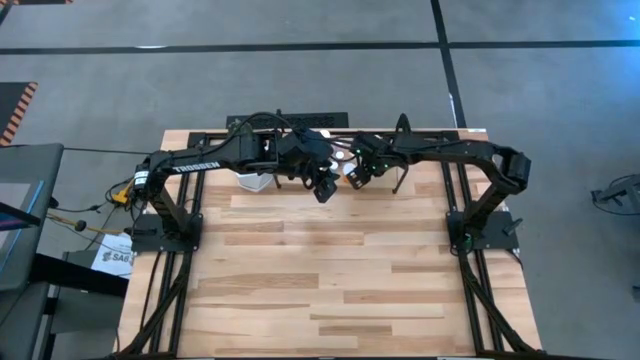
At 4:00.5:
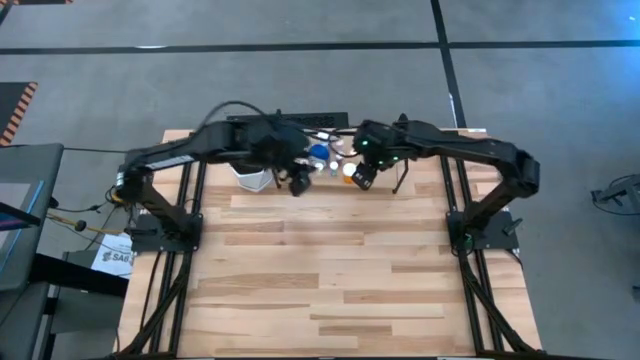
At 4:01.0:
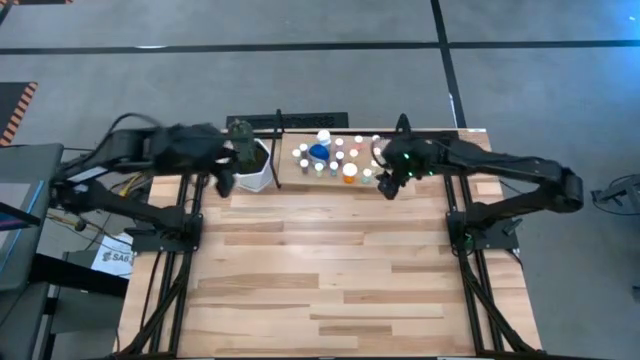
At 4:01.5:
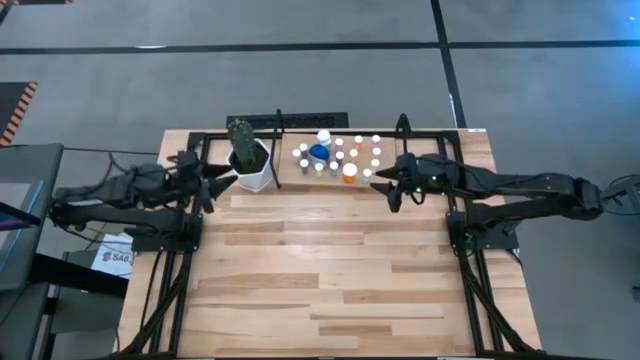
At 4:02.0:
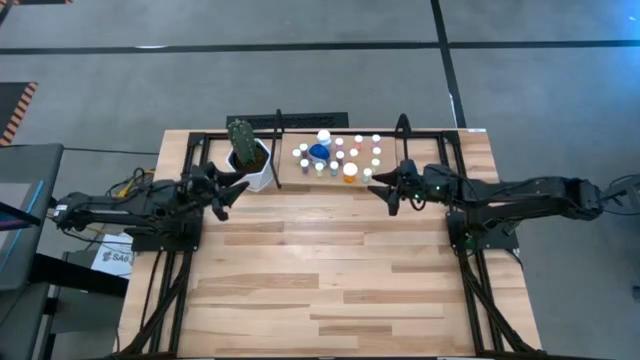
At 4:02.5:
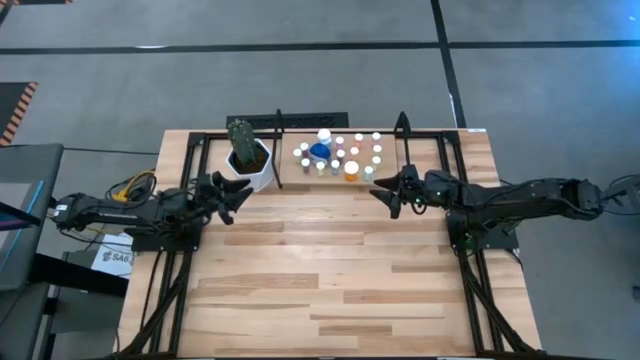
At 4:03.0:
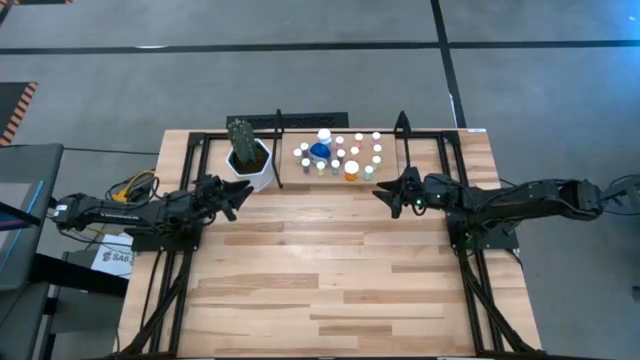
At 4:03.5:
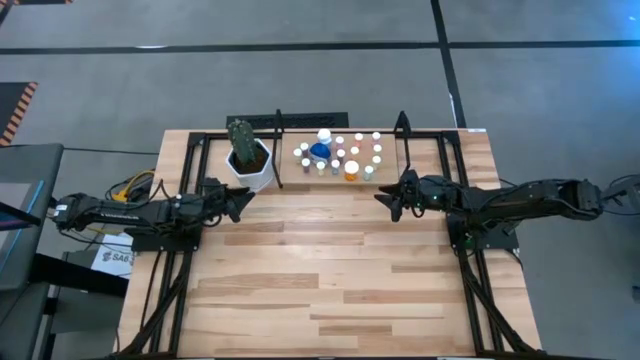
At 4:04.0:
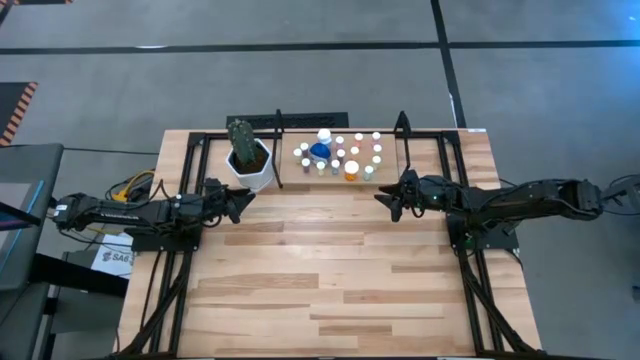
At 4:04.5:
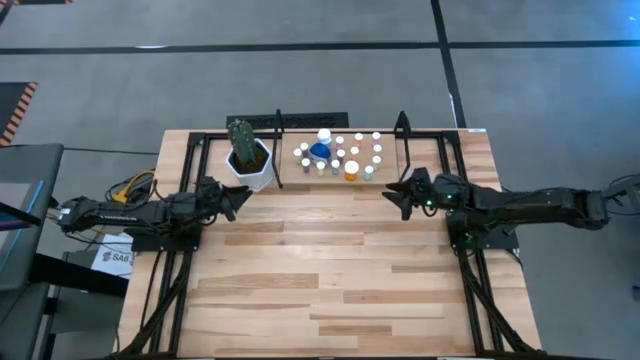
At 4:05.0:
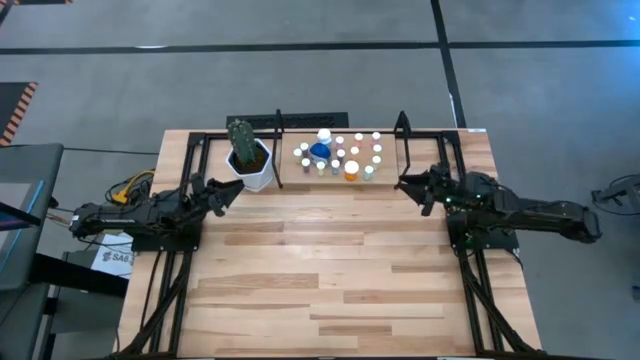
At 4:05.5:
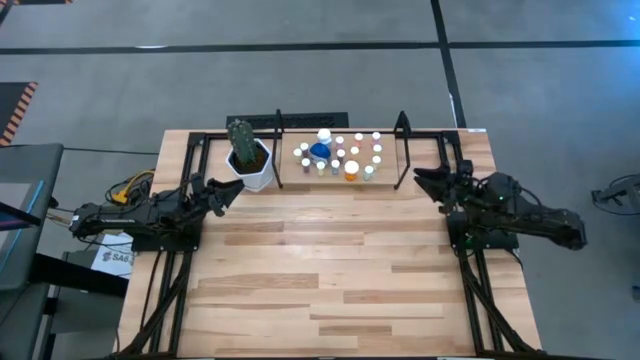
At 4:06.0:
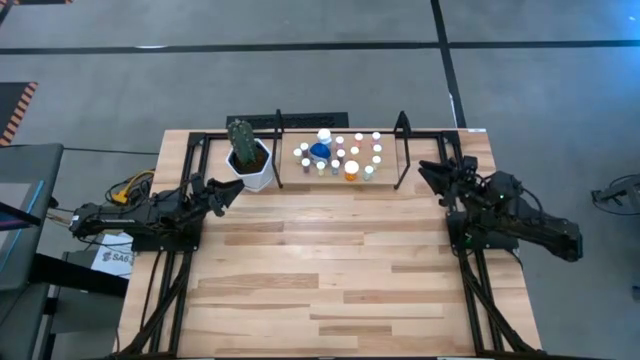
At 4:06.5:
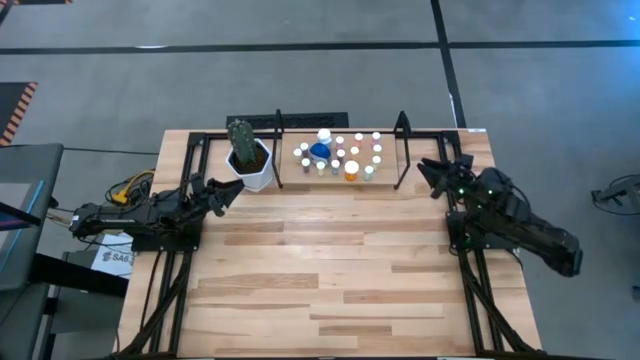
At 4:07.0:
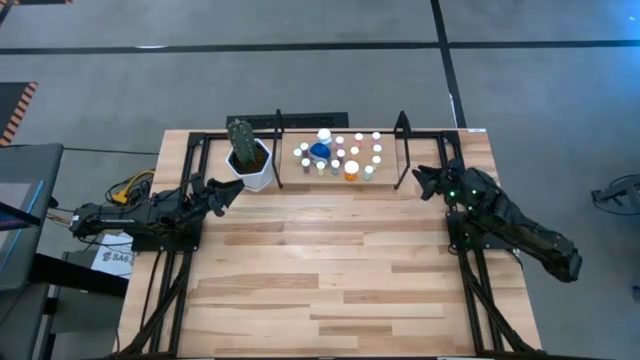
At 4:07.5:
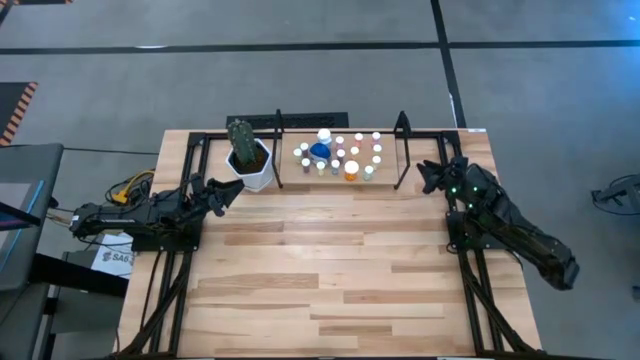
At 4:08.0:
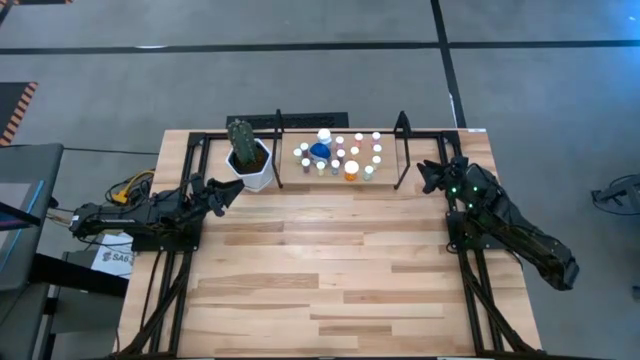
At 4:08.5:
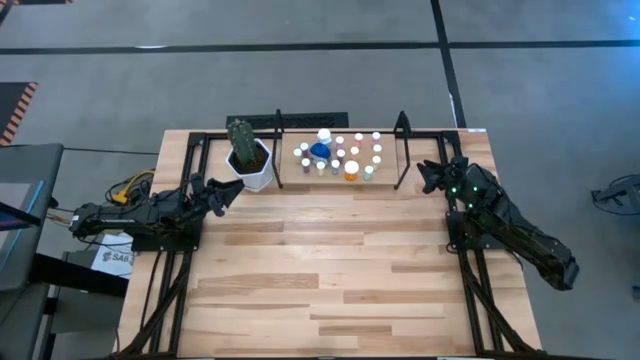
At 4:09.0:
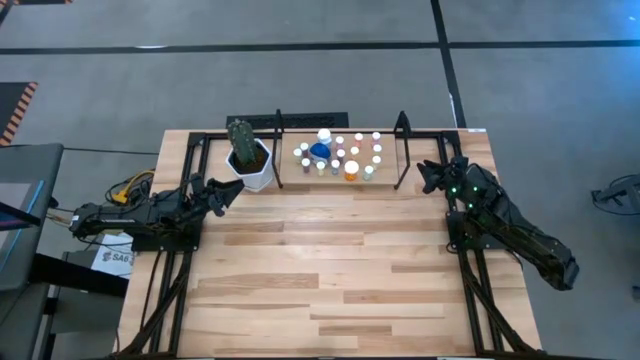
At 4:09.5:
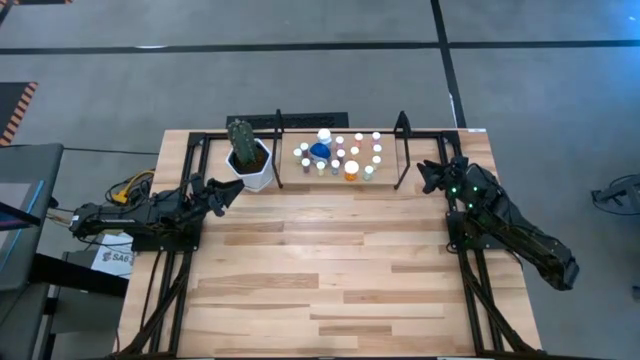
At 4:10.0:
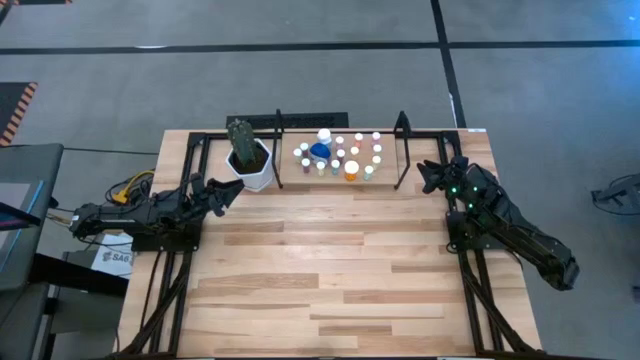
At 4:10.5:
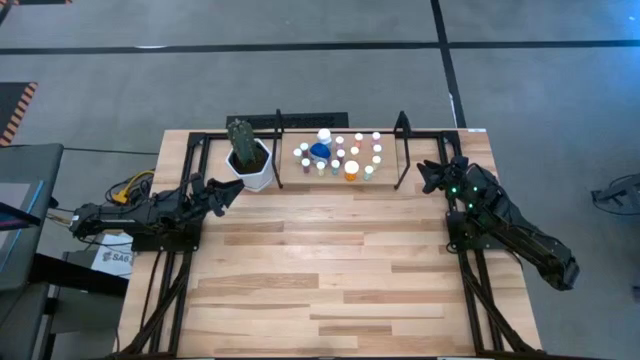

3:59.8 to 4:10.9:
Task: Pick and place medicine bottles onto shelf by color
Return to Home Position

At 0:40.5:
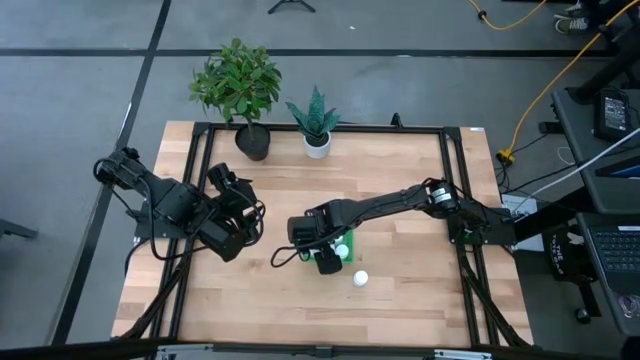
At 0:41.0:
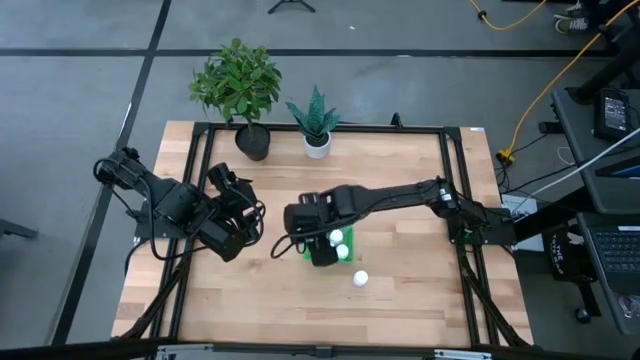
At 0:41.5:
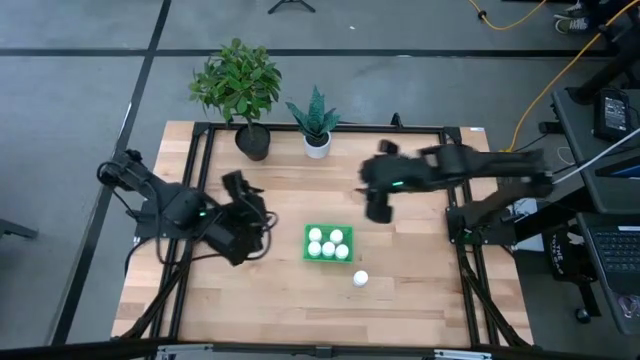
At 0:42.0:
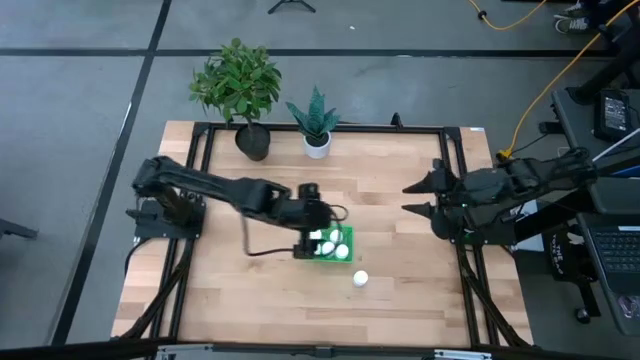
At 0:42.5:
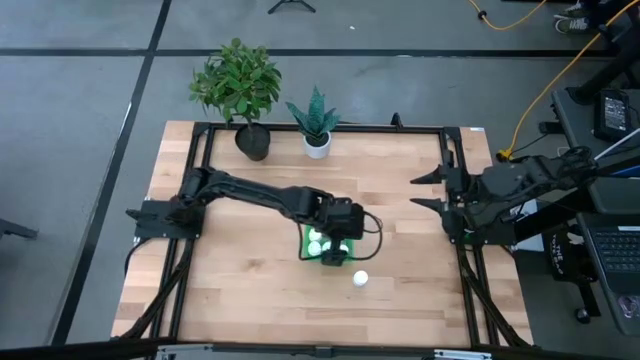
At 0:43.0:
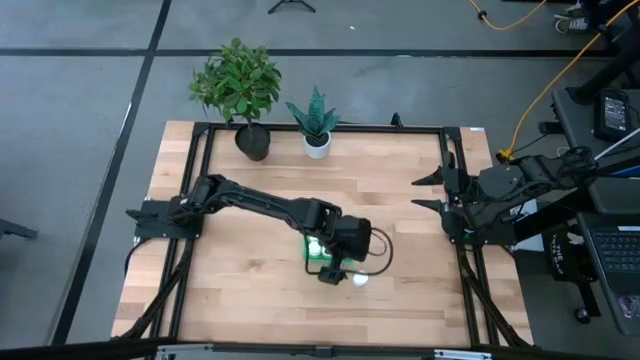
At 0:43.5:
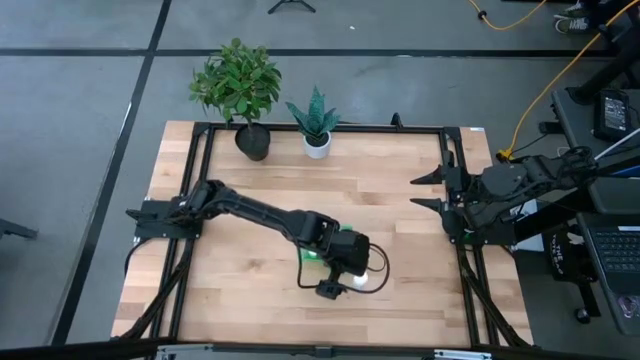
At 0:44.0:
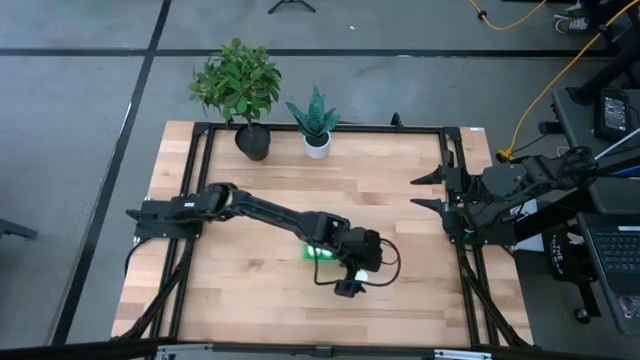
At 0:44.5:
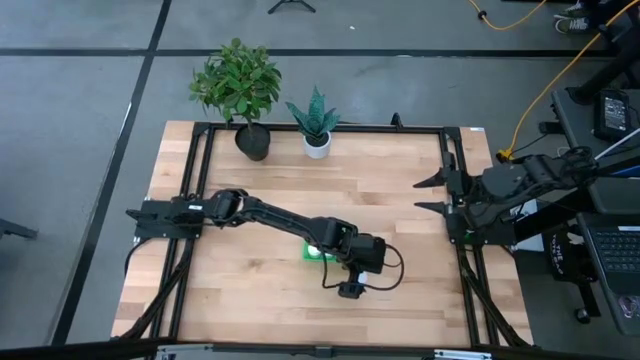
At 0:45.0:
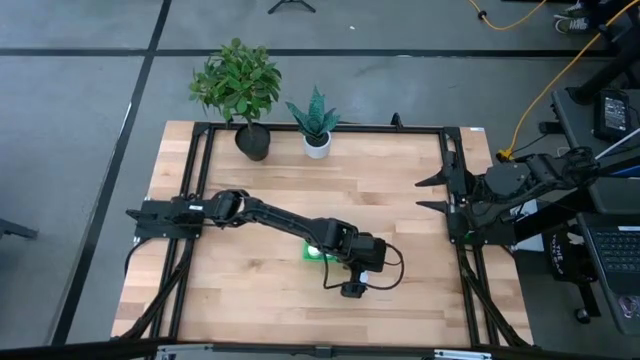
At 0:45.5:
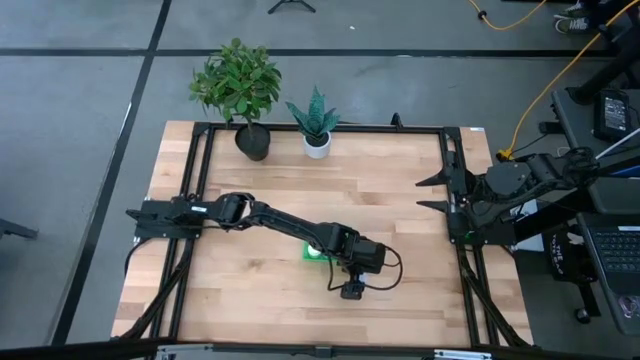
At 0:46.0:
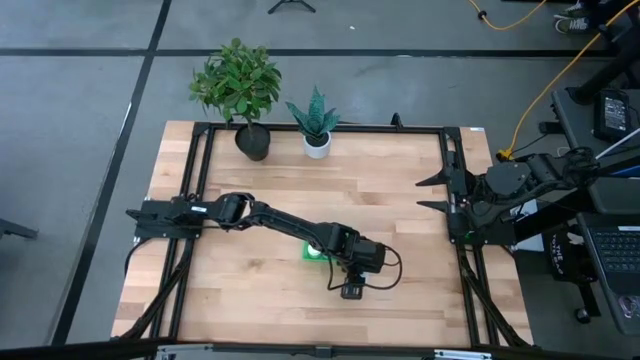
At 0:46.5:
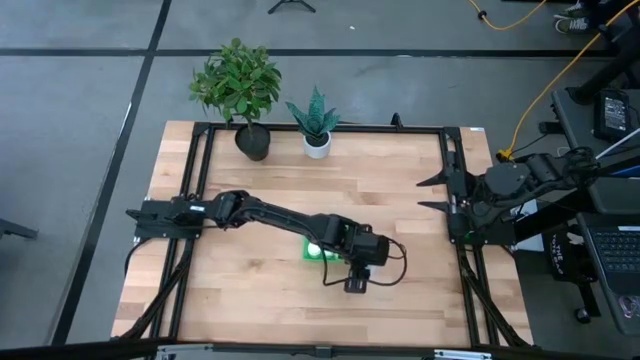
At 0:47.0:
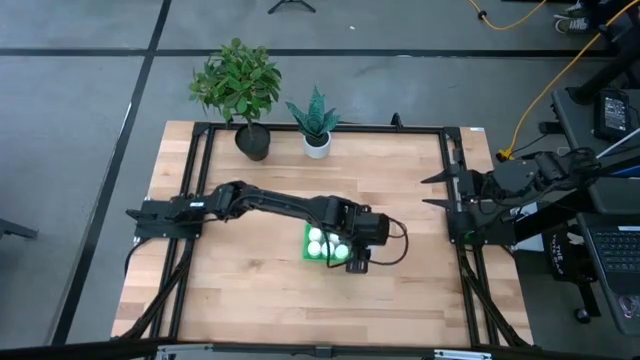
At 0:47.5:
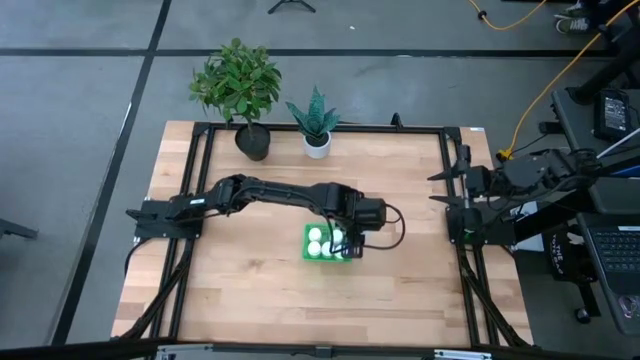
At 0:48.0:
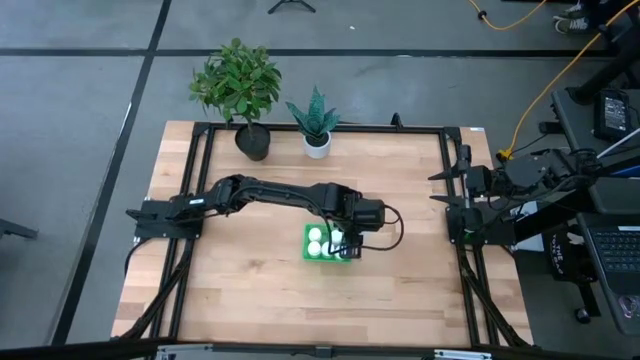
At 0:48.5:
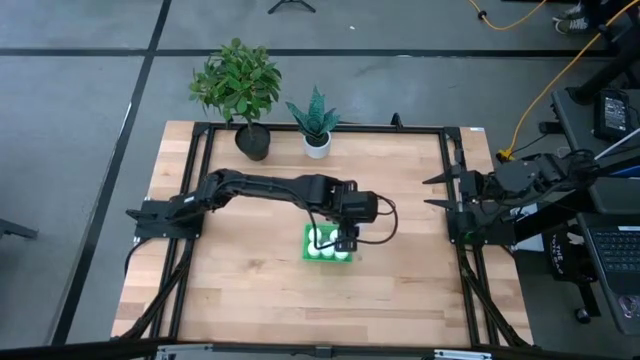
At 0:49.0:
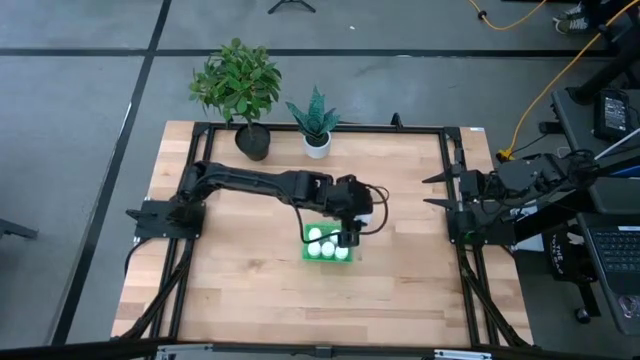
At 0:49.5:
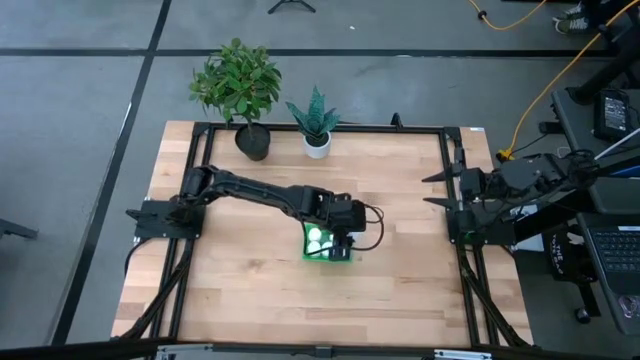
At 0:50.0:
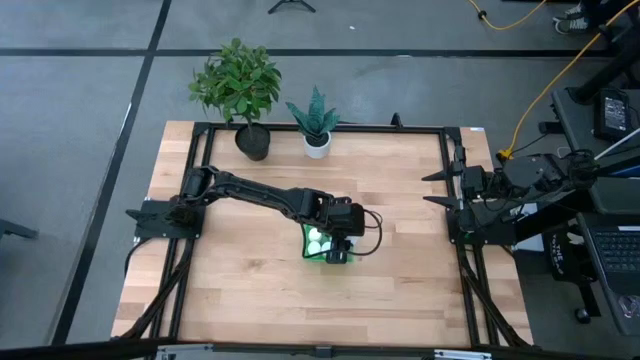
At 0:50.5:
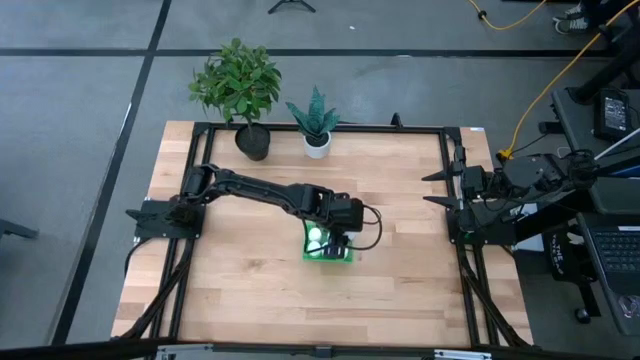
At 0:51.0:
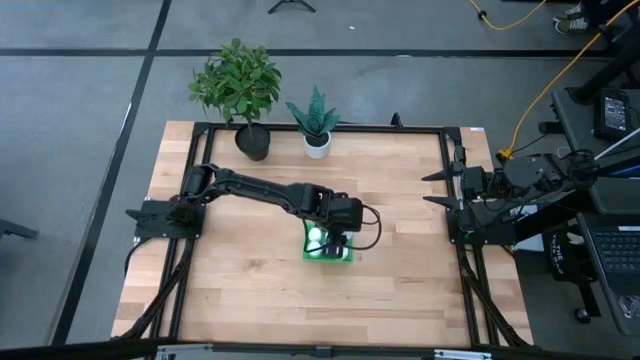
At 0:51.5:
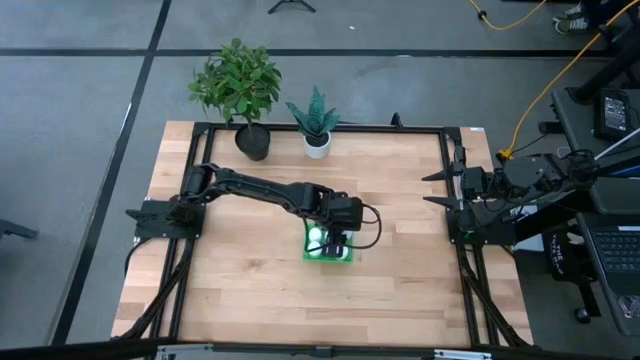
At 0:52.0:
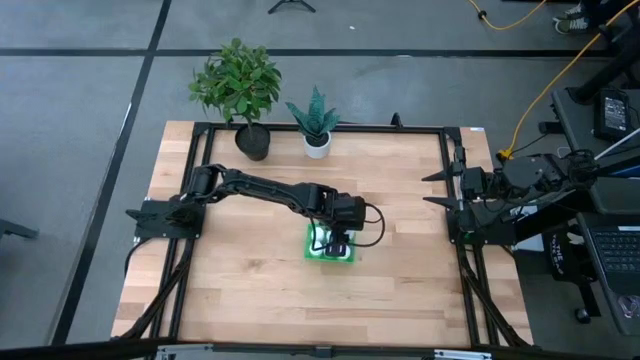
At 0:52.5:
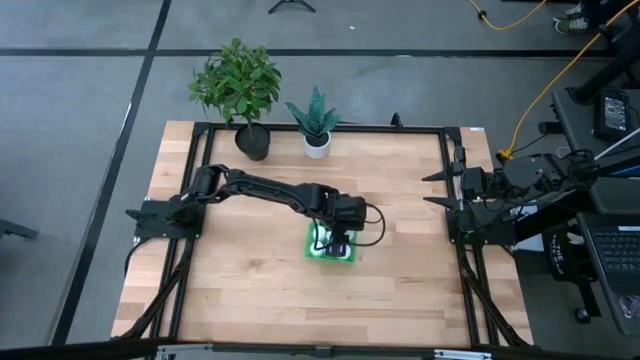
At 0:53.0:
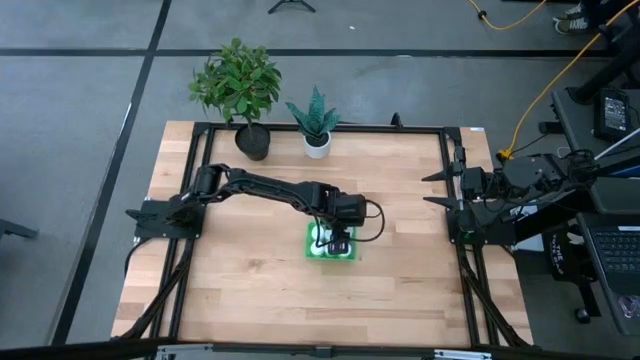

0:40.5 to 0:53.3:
Task: Pick and place pill bottles into a basket
Put the white pill bottle into the green bin
